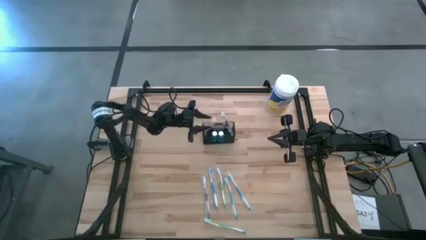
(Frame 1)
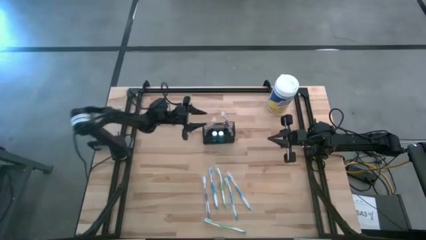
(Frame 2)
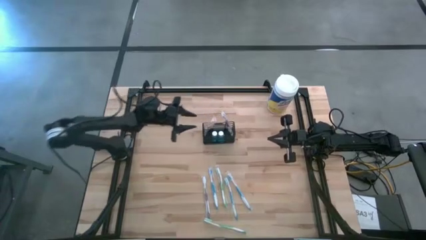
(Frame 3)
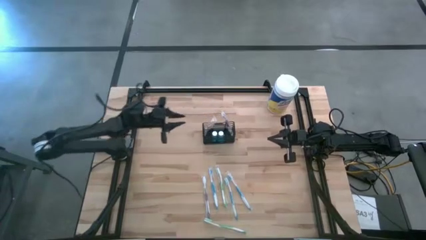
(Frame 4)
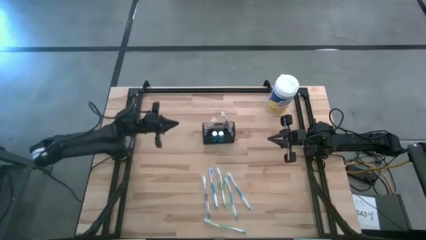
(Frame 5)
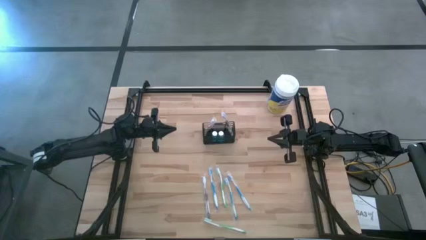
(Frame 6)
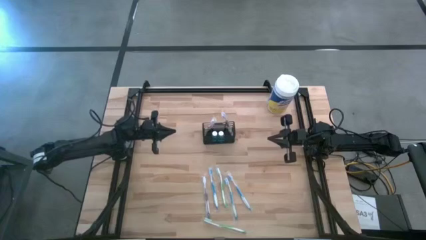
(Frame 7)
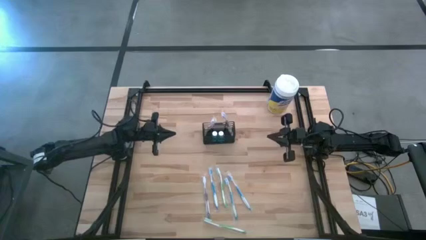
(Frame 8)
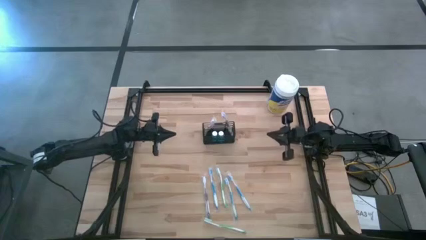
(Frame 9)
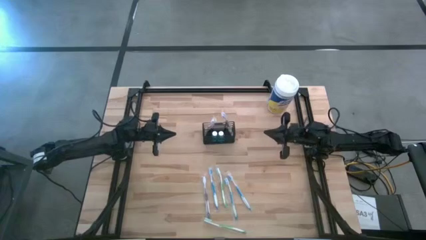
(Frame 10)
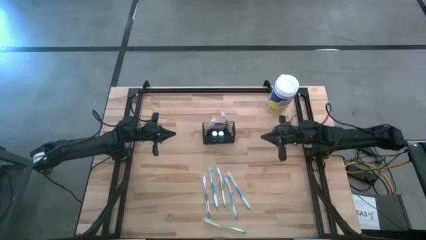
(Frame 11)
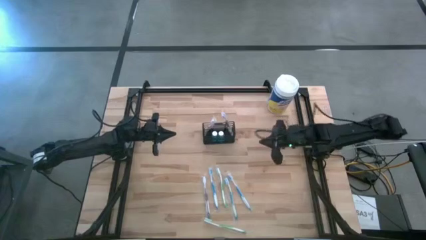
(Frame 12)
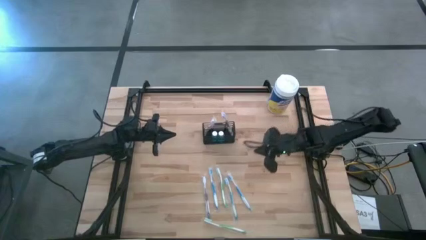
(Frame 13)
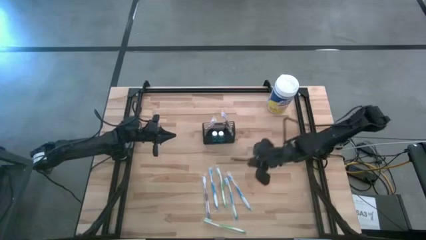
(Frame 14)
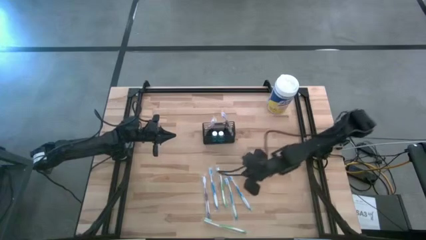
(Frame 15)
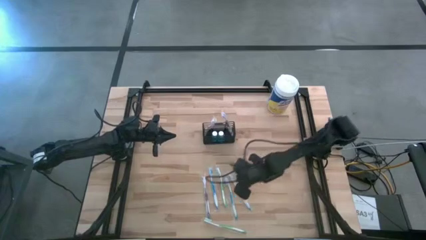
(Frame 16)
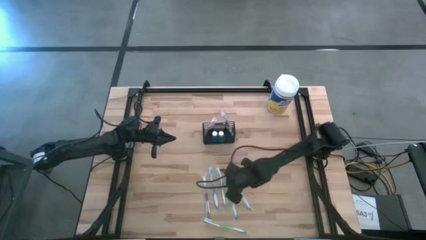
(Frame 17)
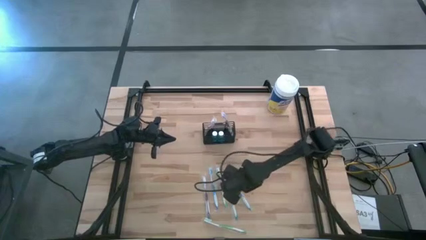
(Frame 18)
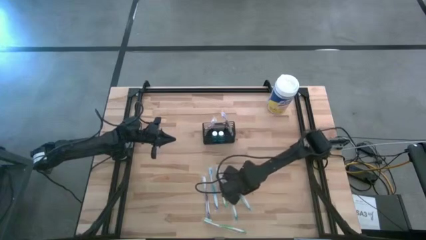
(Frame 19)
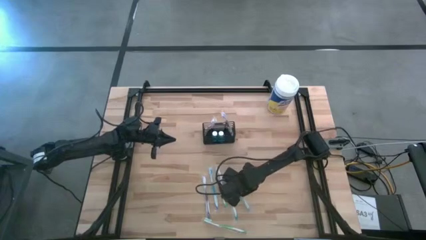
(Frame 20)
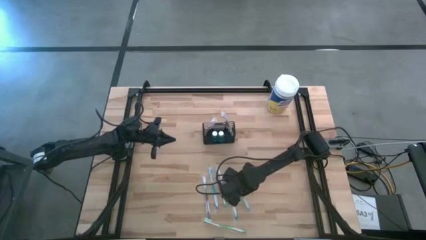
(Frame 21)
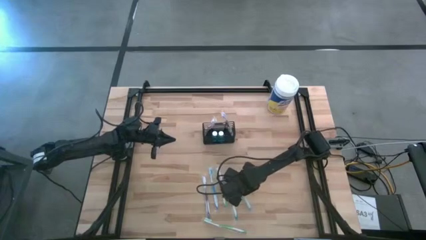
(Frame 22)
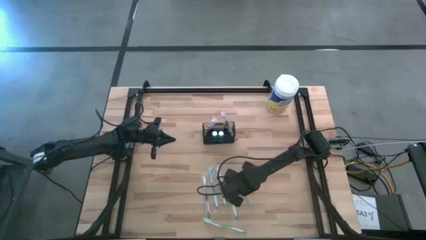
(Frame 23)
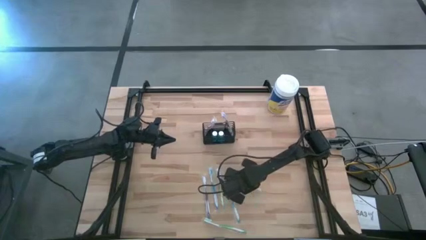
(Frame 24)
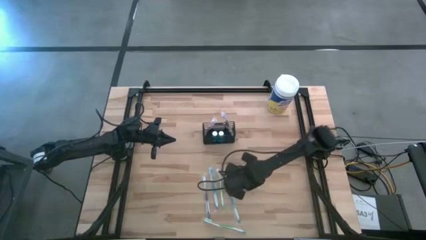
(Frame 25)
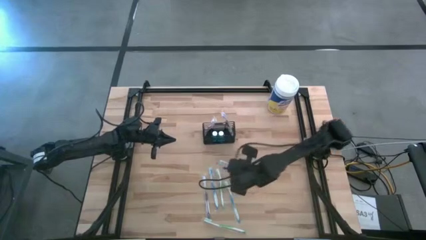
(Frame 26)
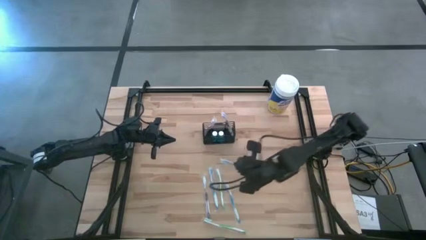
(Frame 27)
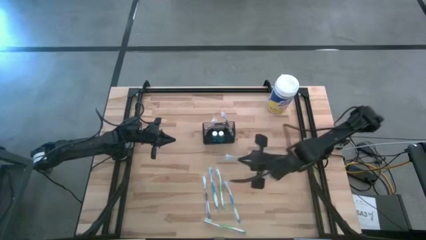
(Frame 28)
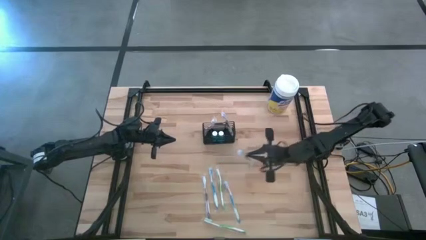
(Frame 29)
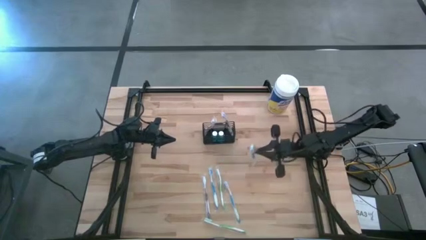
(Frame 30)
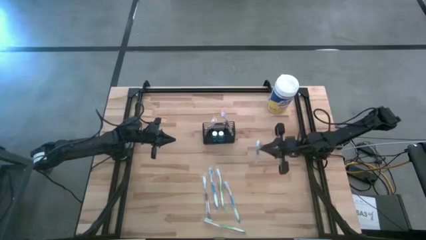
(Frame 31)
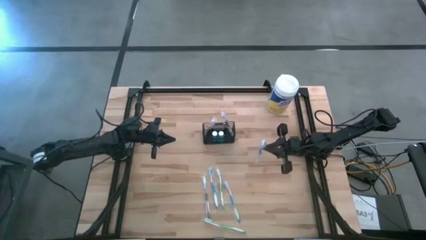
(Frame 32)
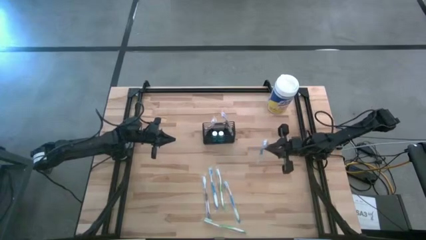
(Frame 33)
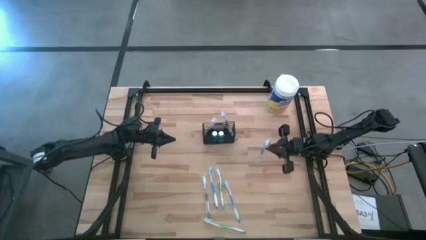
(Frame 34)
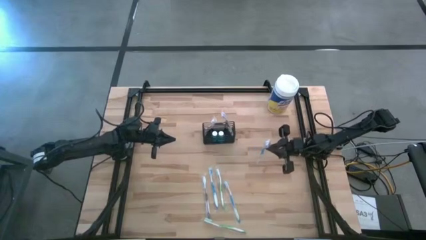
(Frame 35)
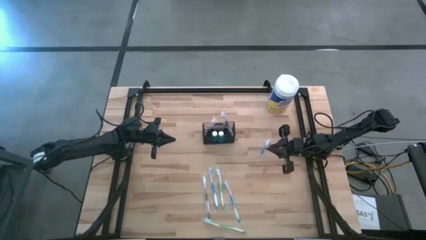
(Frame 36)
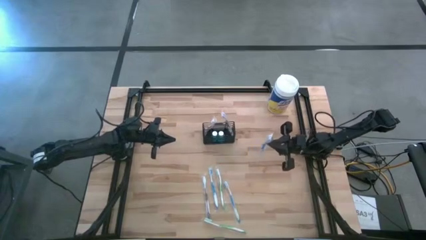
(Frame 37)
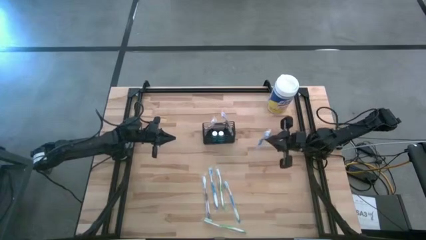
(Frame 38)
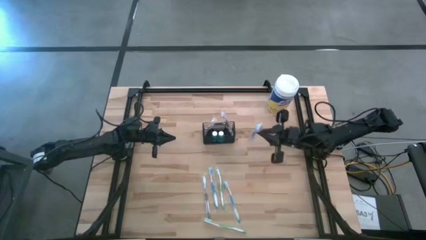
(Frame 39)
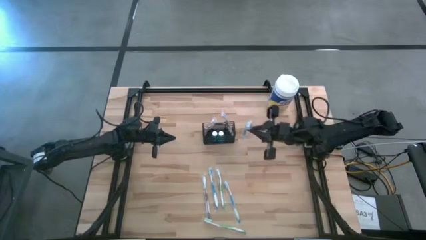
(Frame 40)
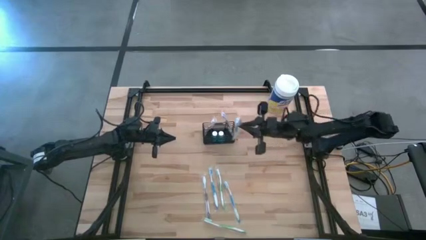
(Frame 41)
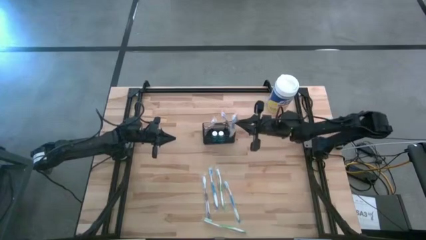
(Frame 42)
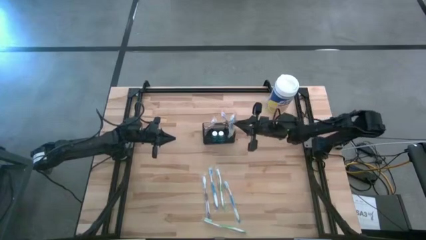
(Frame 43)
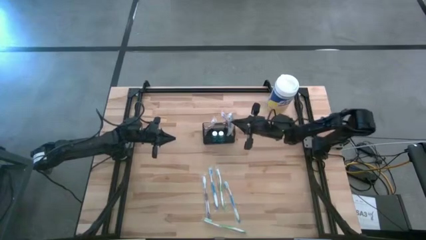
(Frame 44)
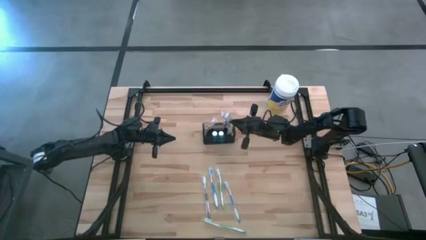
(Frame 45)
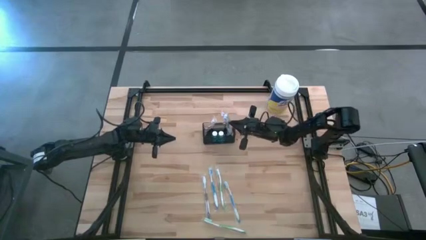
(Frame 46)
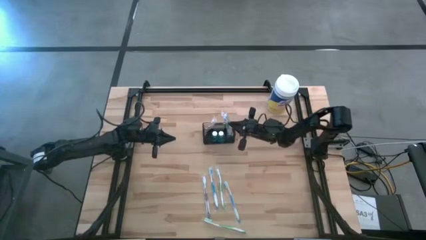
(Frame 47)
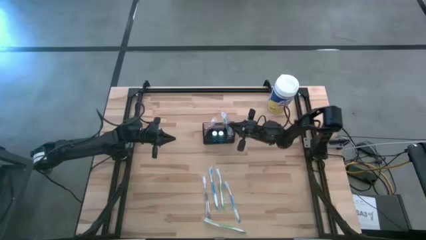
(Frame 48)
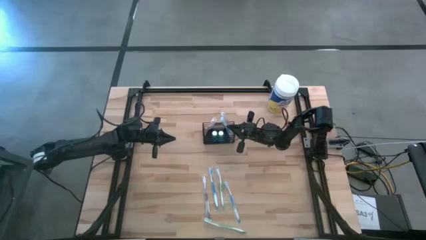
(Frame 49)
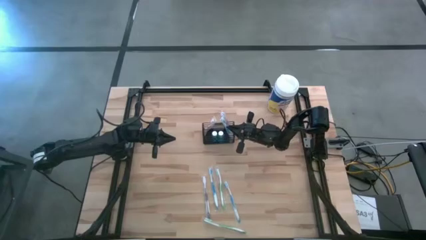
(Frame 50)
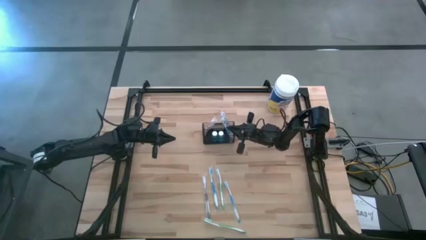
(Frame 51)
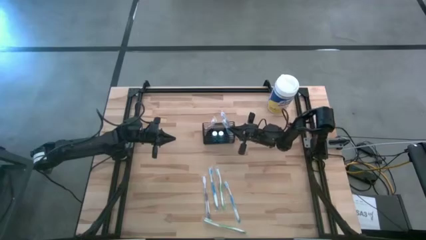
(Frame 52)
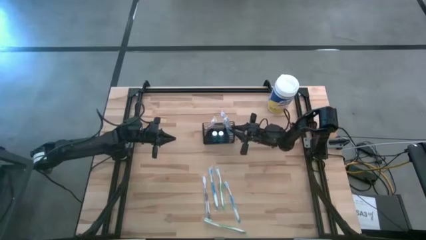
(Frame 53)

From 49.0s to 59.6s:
Task: Pick & Place toothbrushing station
Put the right blue toothbrush into the mesh organizer

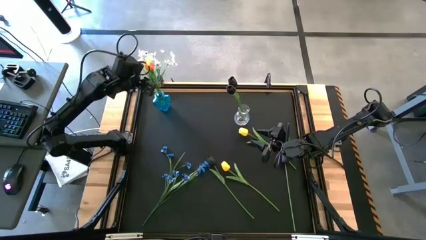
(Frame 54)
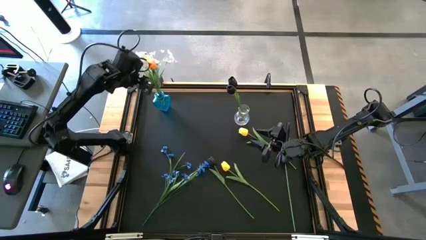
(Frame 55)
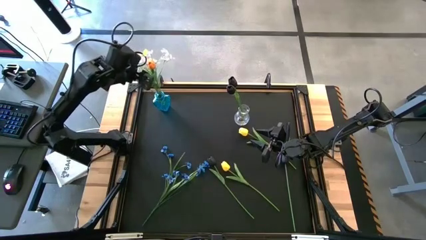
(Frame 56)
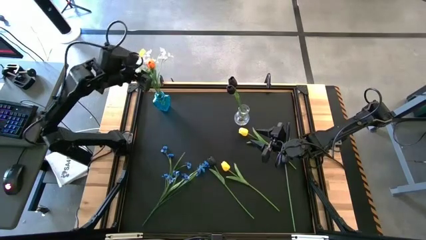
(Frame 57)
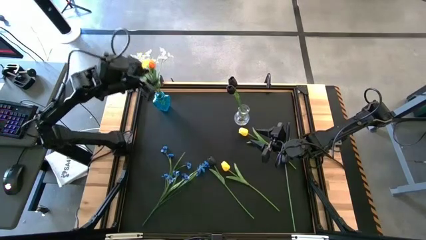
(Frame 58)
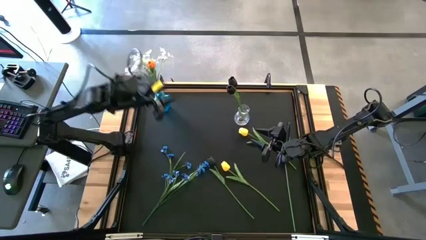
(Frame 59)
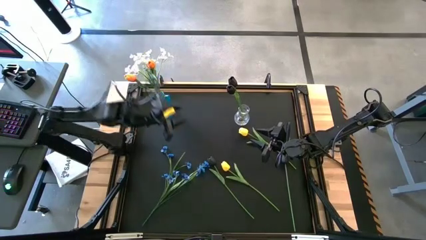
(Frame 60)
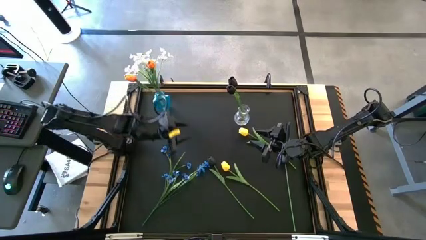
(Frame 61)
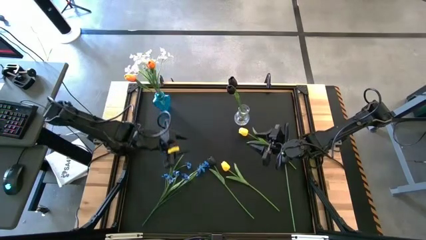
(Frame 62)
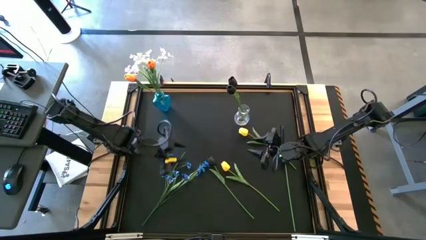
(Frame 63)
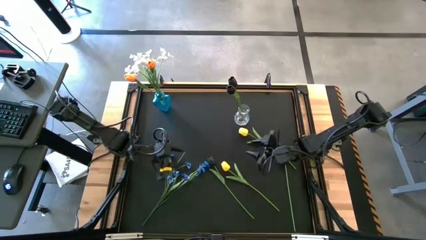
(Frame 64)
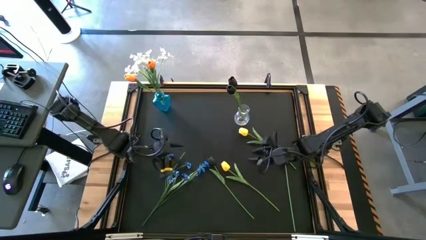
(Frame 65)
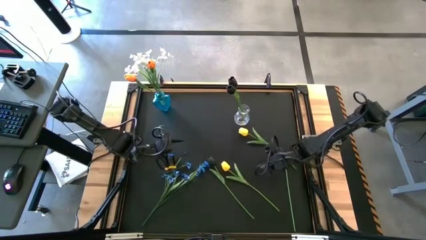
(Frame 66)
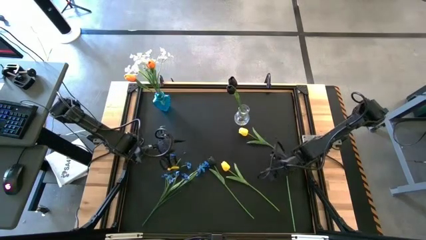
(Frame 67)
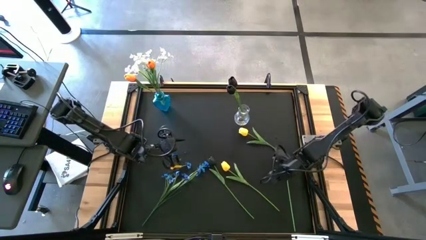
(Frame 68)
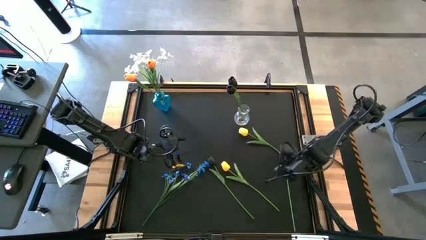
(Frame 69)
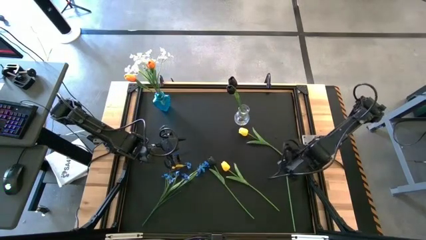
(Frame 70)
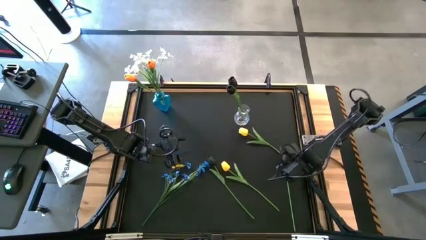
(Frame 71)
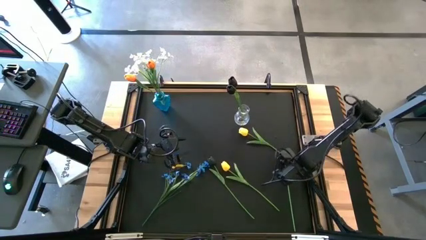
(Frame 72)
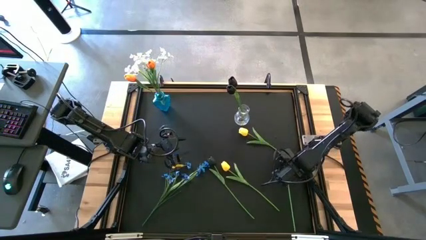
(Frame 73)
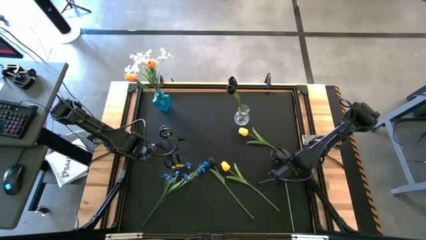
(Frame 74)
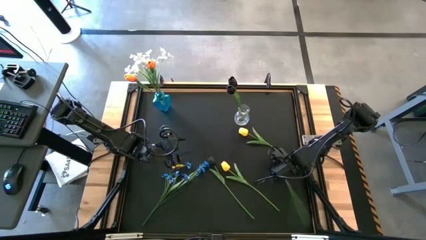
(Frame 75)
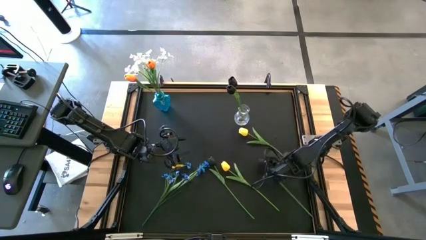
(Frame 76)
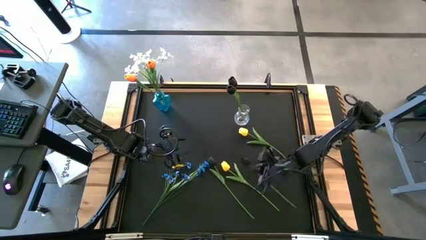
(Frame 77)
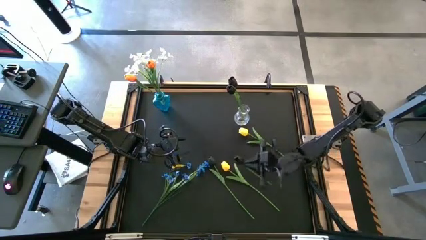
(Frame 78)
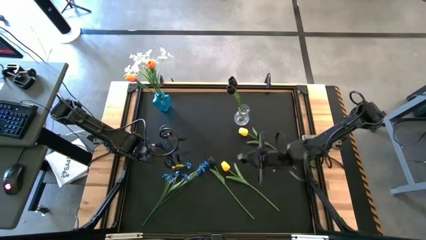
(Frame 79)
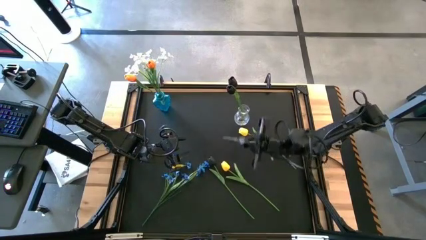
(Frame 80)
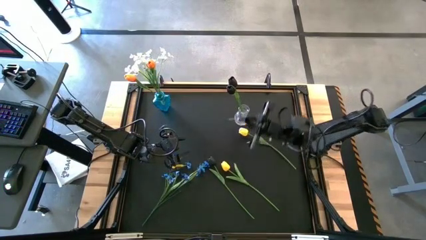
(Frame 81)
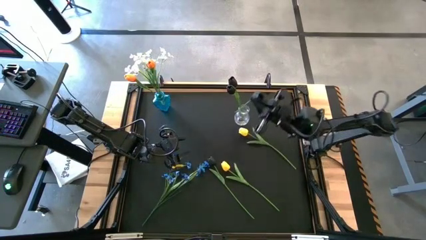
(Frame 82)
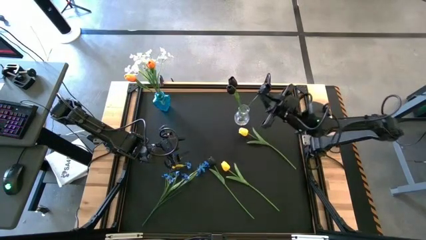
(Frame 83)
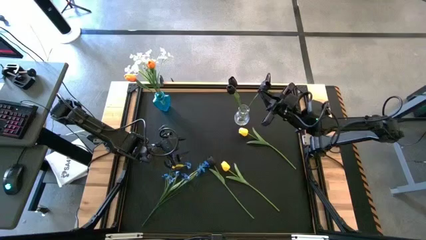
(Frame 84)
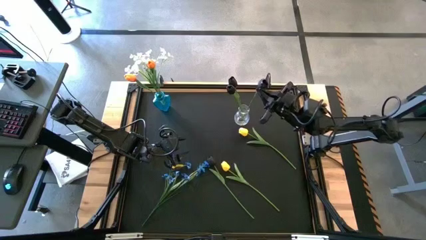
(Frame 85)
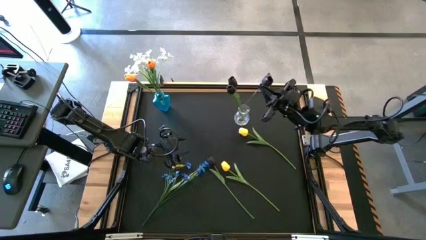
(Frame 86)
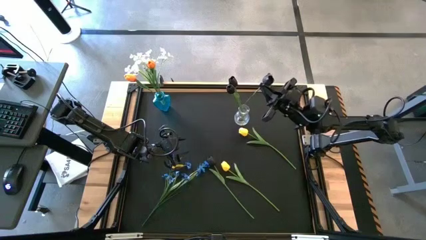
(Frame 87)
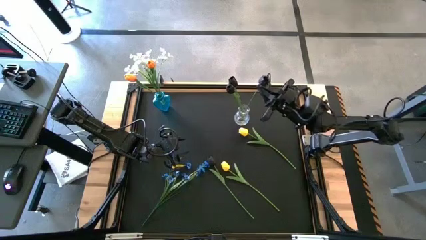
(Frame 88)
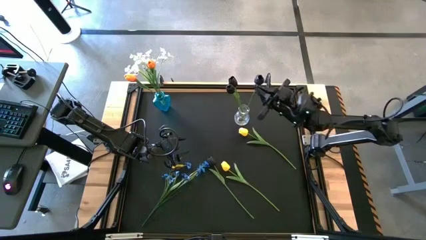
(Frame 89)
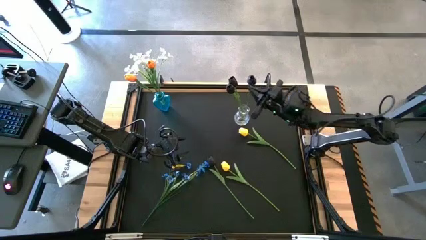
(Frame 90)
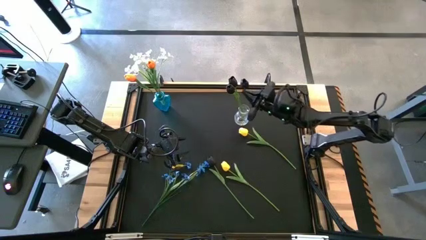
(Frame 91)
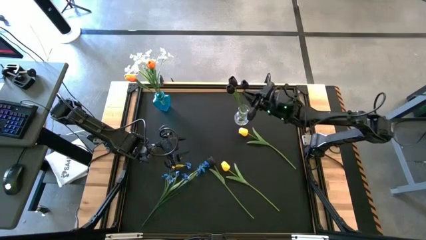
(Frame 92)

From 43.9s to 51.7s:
Task: Sort flowers into vase by color
Put the black flower into the transparent vase
